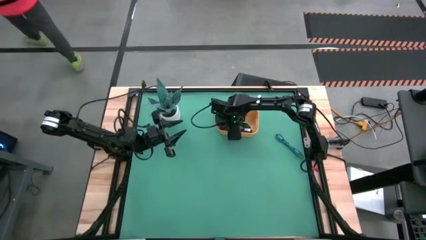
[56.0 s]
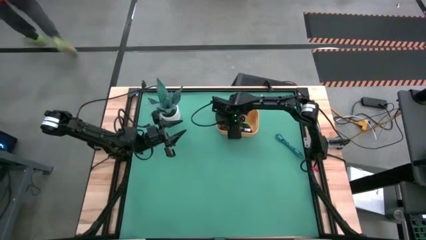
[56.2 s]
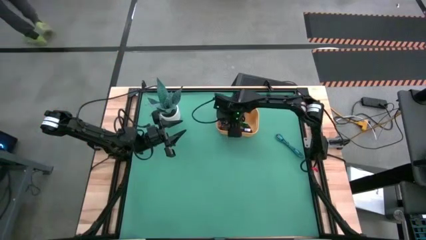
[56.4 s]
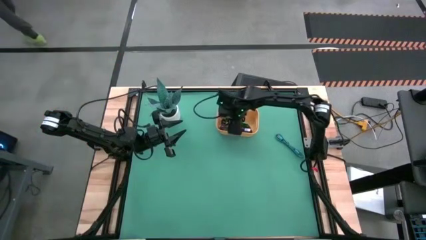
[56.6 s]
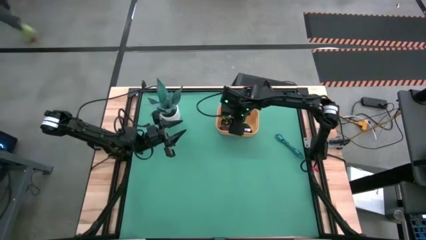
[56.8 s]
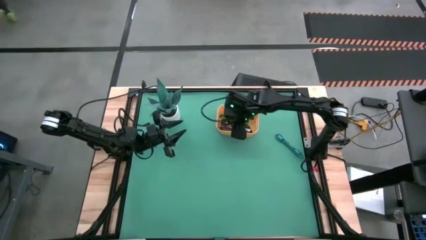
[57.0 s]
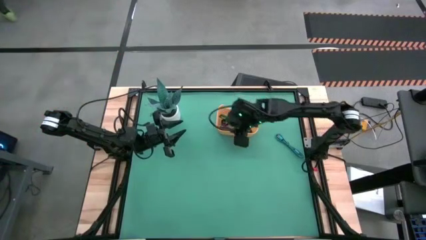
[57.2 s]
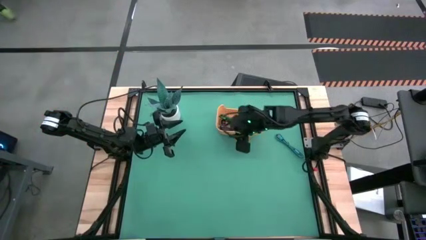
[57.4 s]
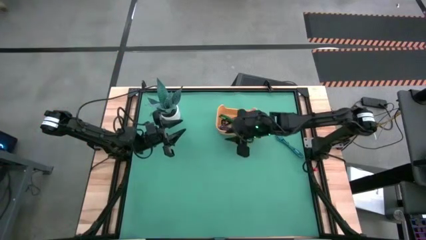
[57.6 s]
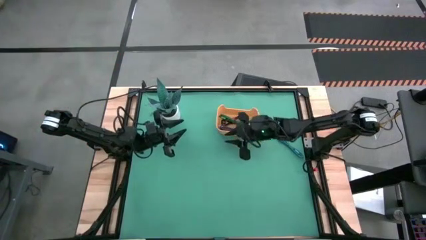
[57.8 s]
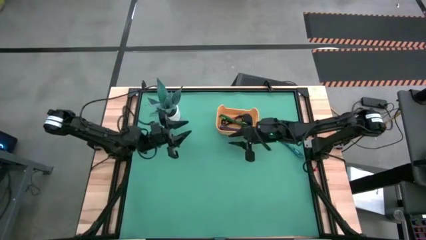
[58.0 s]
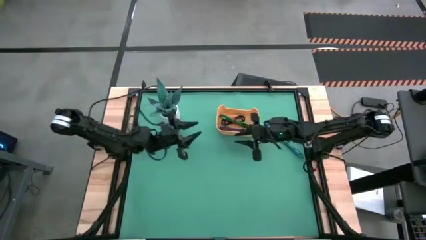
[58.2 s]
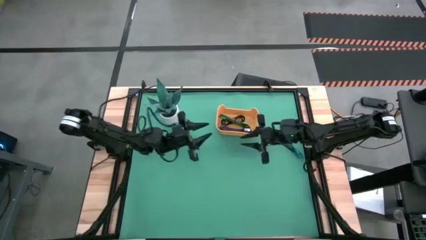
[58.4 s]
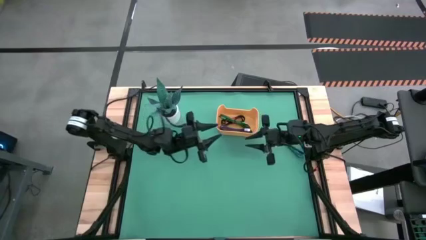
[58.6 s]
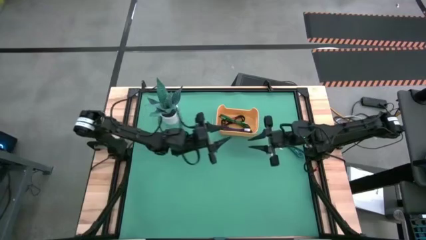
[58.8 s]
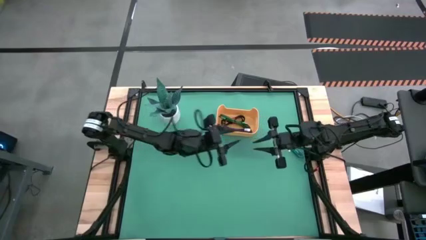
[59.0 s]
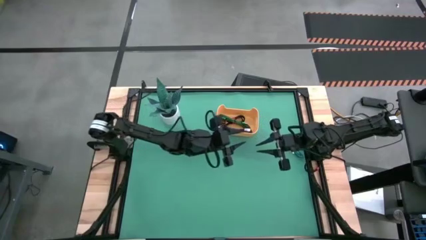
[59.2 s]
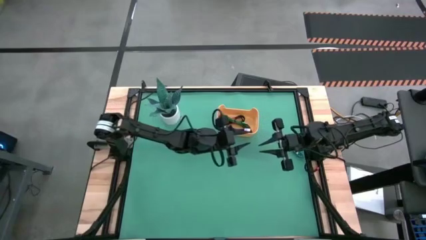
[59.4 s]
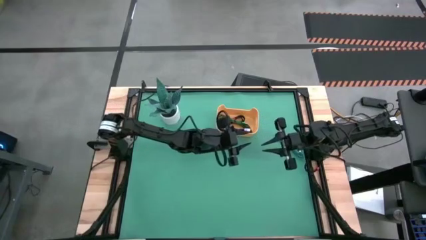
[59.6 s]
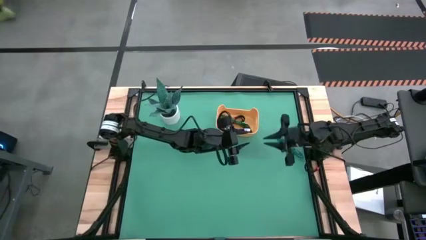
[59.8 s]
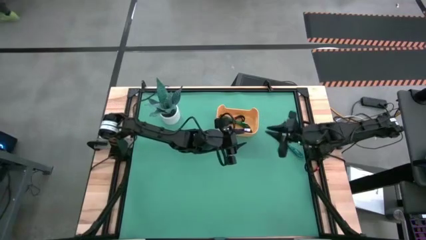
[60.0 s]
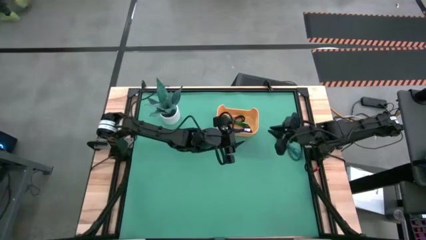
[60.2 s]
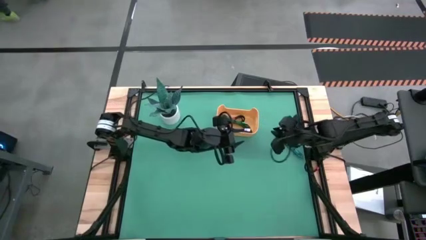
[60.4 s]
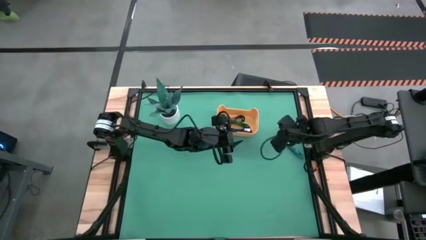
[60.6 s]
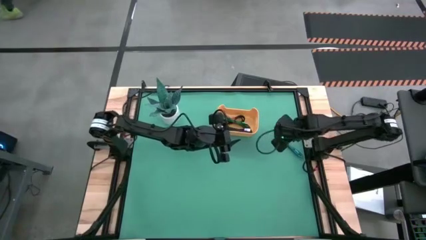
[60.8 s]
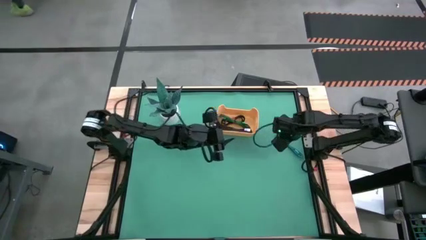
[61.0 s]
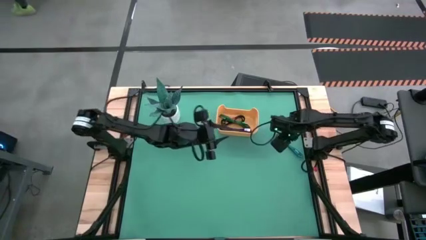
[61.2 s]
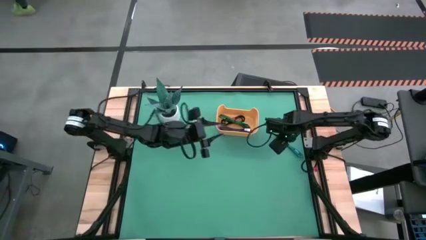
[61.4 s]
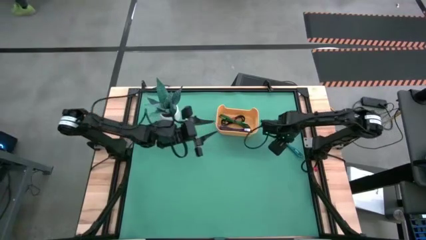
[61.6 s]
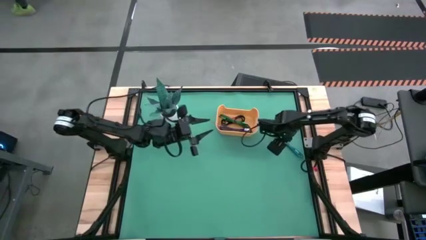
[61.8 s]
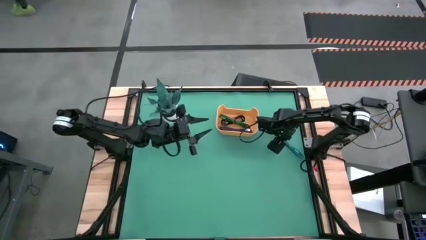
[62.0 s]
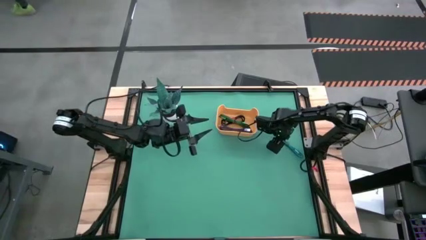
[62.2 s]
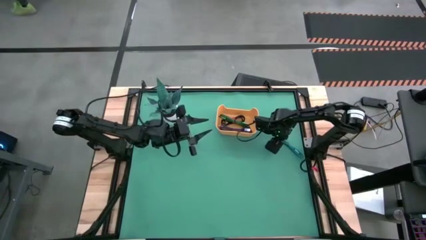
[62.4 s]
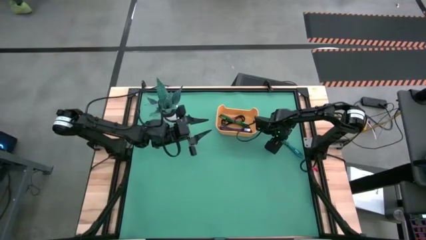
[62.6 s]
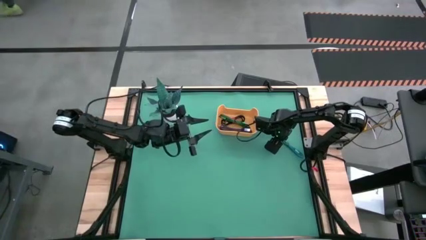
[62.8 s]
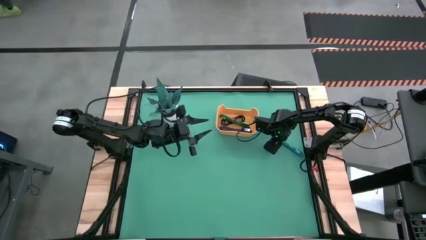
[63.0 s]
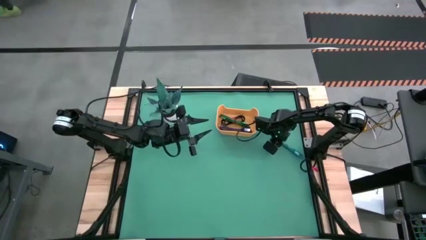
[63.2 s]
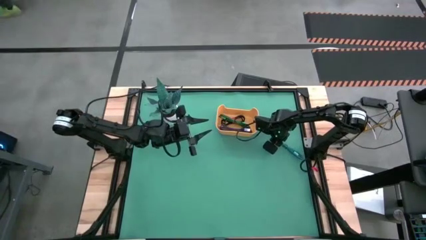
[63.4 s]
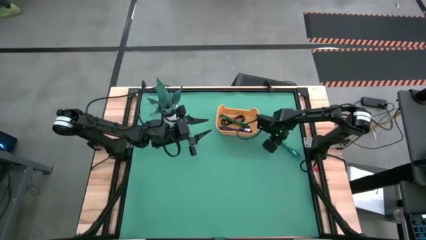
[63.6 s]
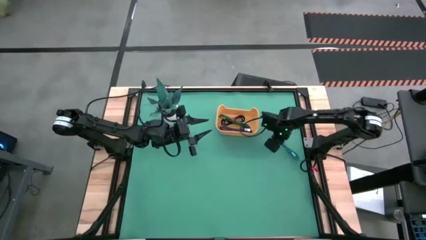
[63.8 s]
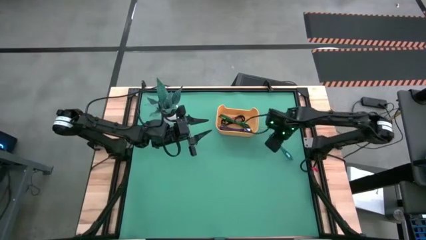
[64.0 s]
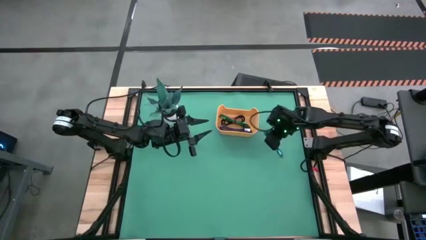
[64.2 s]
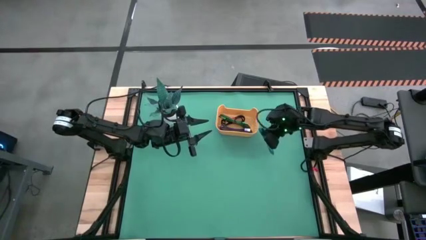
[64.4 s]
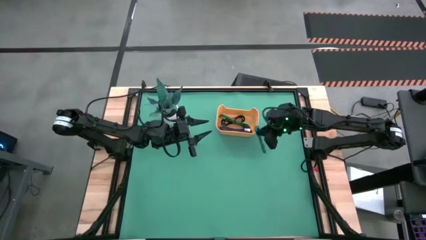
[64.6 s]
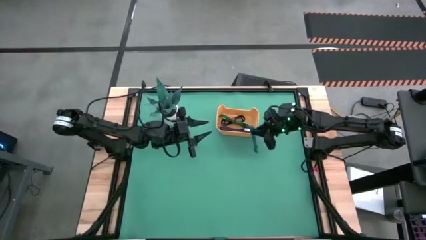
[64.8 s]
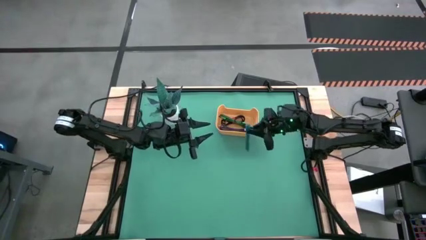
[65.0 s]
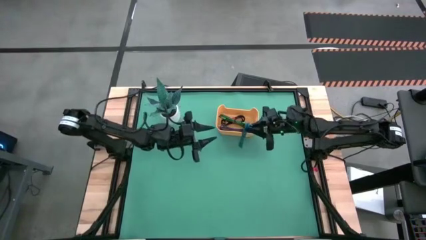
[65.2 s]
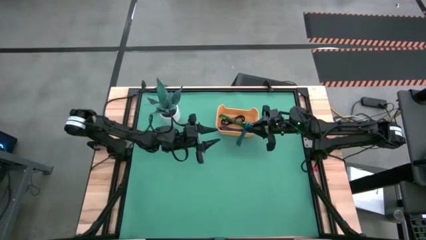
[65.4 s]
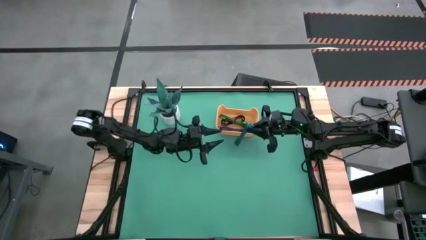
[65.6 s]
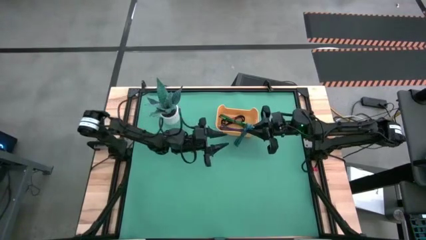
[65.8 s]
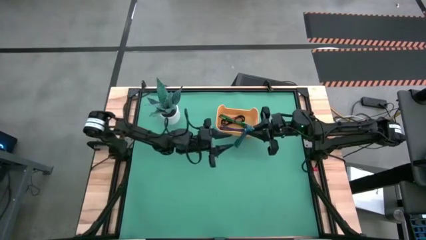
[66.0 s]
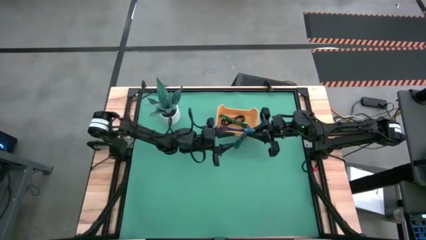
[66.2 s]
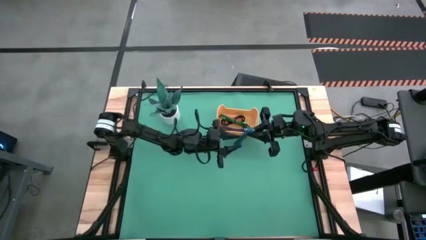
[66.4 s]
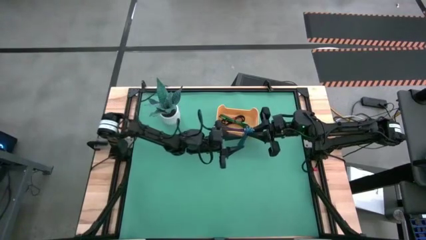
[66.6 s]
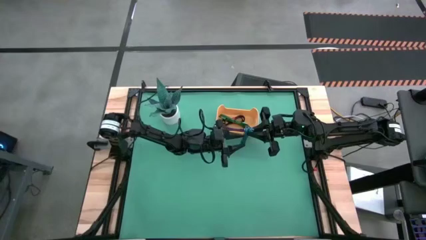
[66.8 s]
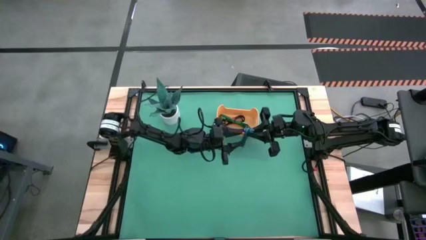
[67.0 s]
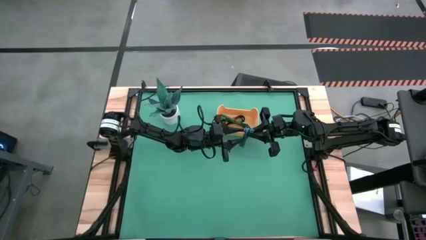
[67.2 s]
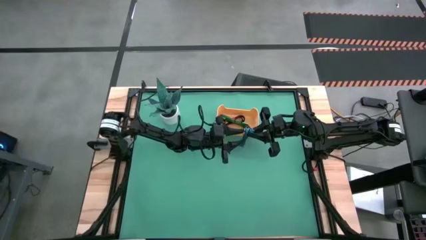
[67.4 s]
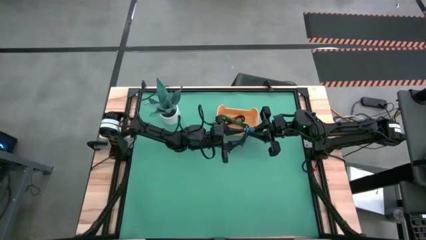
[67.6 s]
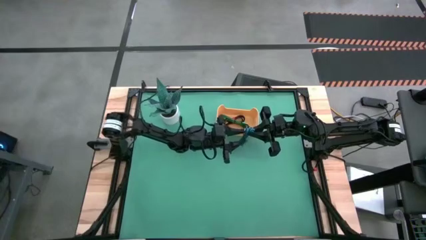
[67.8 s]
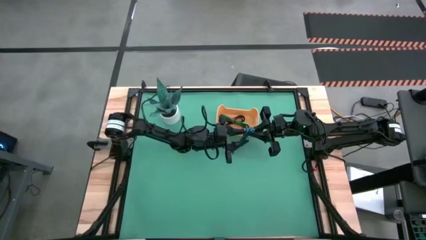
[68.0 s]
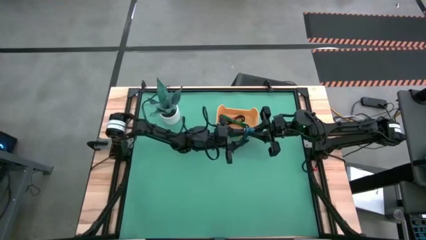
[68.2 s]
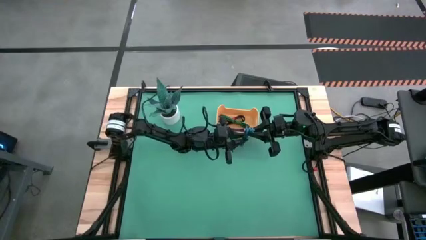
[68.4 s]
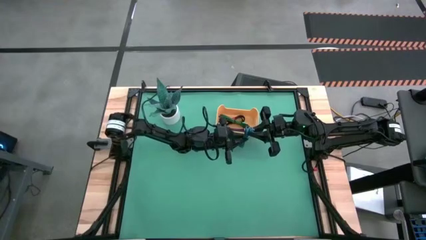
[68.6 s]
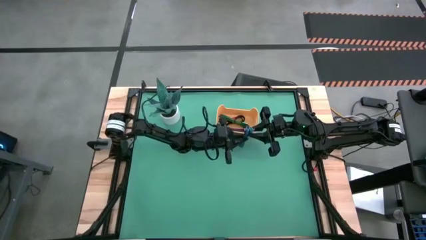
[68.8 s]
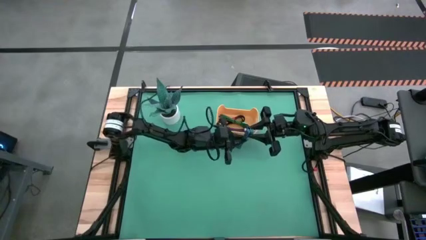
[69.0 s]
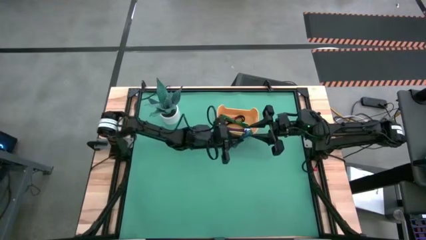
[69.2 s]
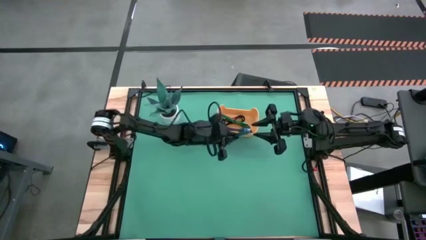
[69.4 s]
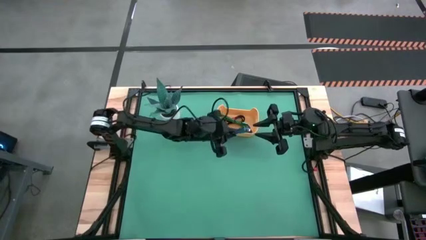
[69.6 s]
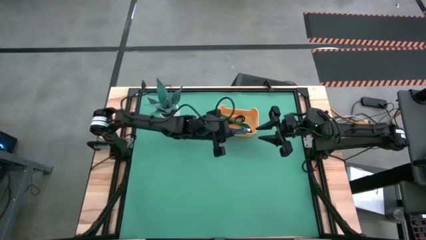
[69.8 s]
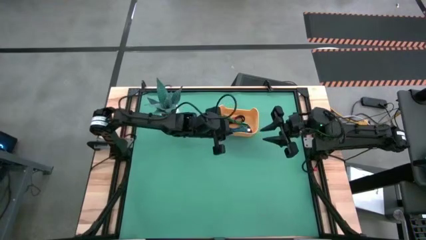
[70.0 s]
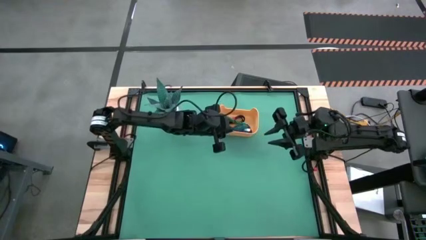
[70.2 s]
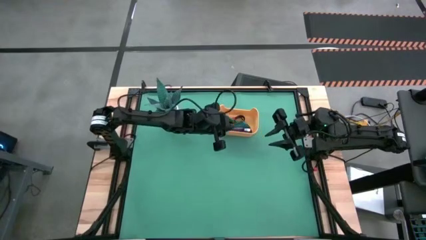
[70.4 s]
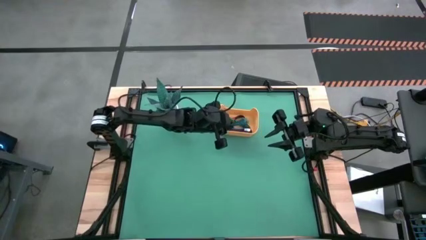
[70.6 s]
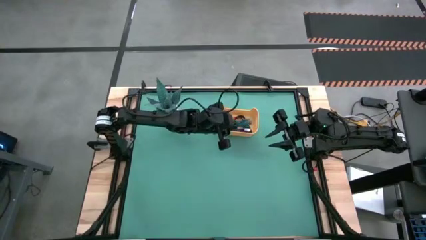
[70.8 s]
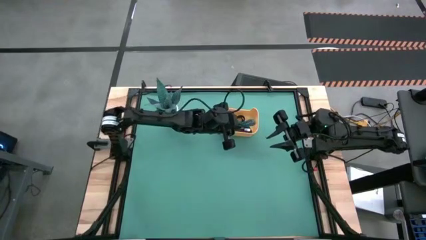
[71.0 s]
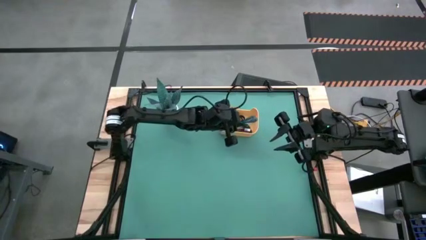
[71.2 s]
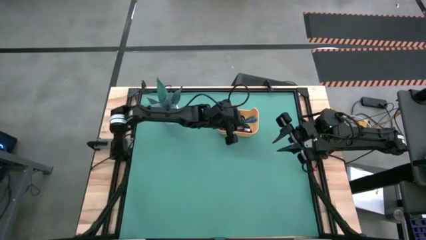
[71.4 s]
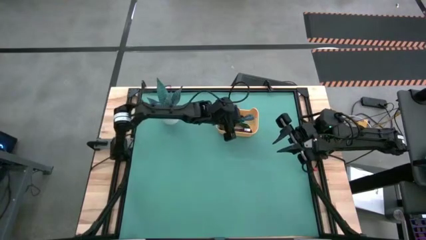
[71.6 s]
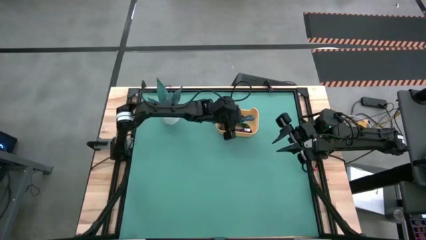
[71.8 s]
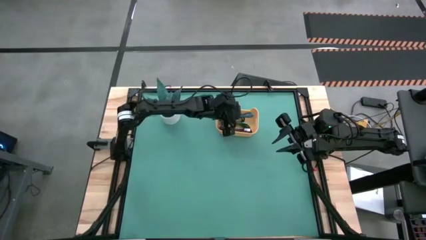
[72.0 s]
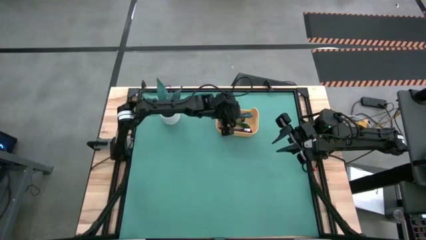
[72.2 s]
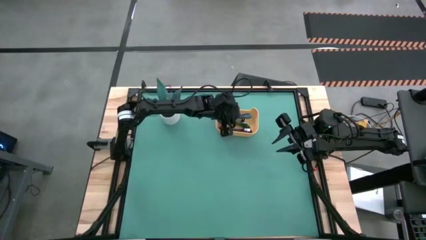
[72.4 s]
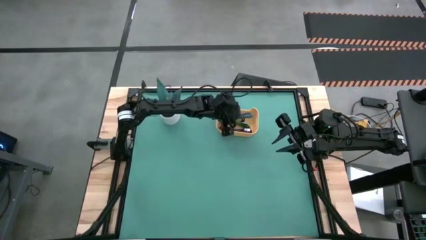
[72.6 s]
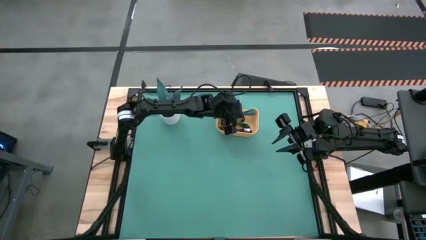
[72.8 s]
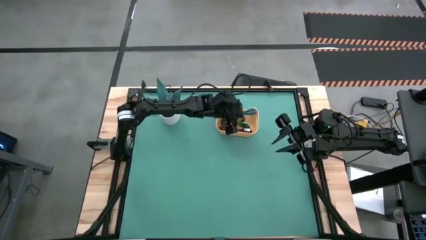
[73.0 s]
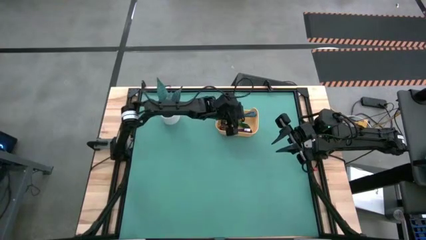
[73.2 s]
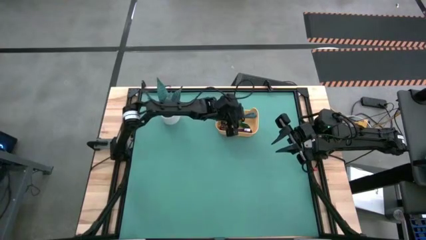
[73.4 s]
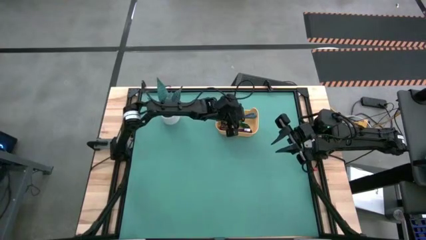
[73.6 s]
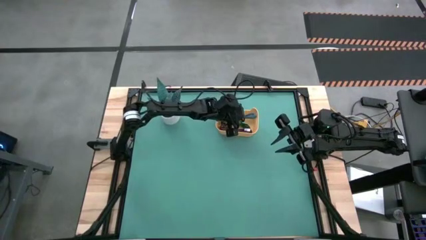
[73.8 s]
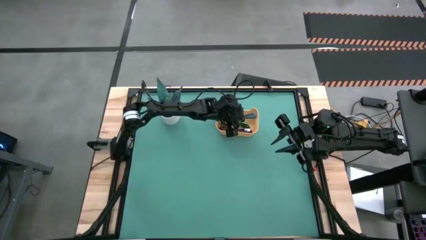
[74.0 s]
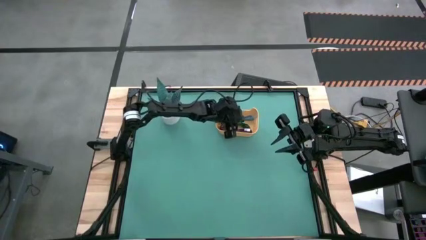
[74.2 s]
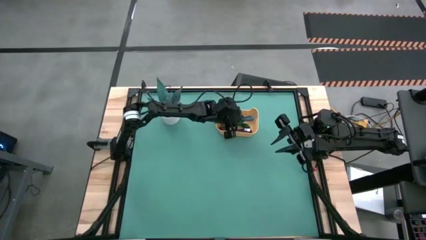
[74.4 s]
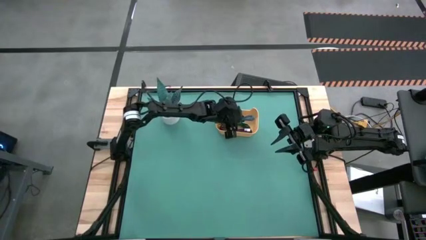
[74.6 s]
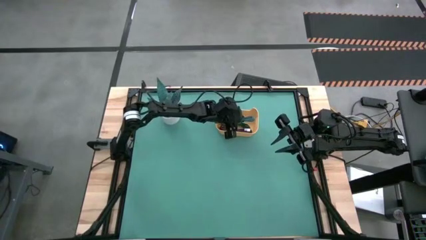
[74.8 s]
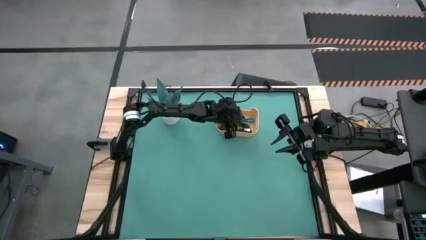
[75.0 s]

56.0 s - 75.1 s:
Task: Pick and place USB-C Cables
Put the blue charger cable into the yellow bin
